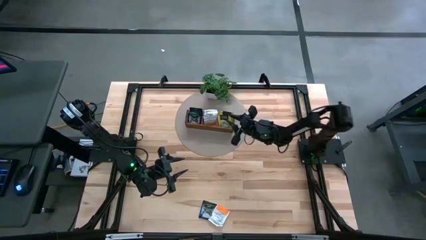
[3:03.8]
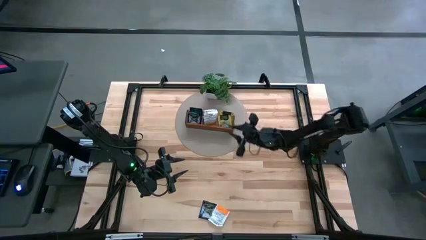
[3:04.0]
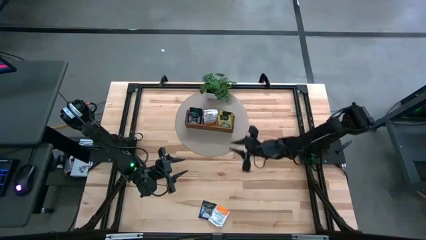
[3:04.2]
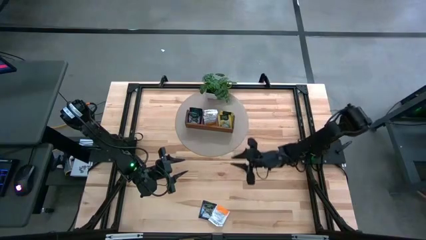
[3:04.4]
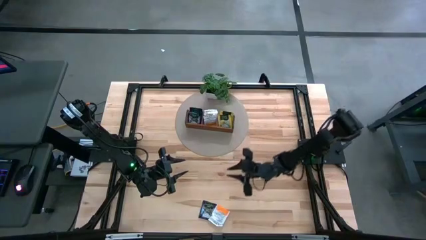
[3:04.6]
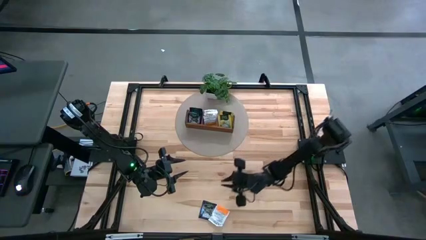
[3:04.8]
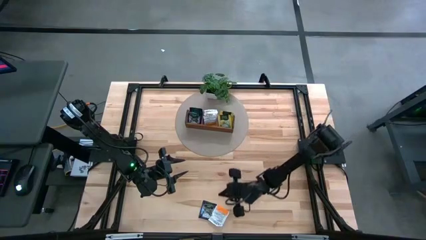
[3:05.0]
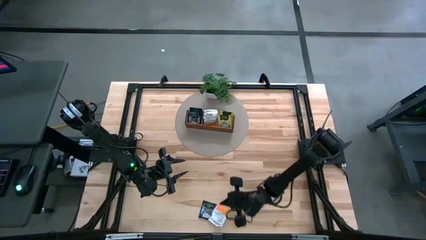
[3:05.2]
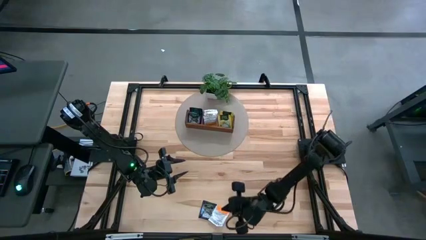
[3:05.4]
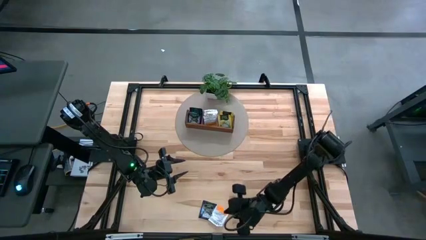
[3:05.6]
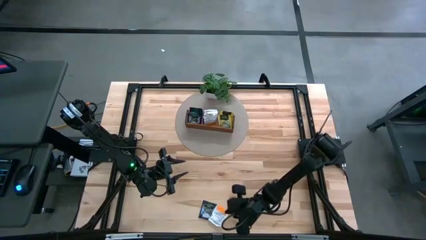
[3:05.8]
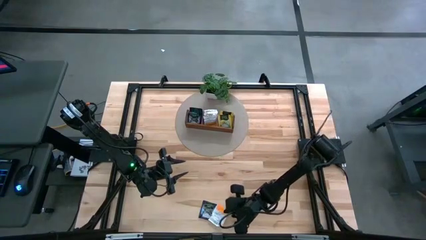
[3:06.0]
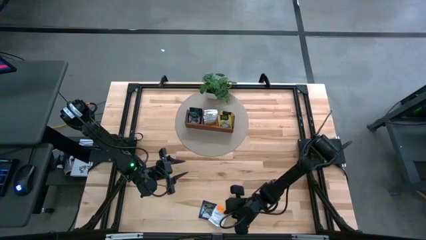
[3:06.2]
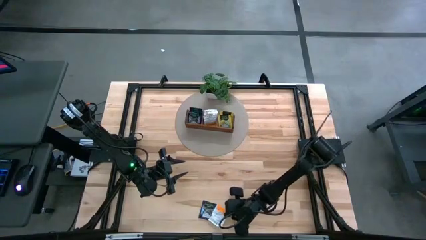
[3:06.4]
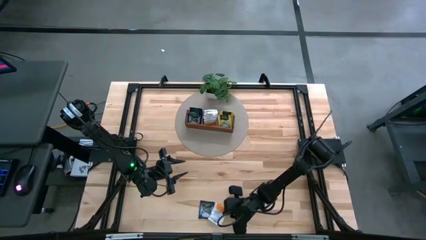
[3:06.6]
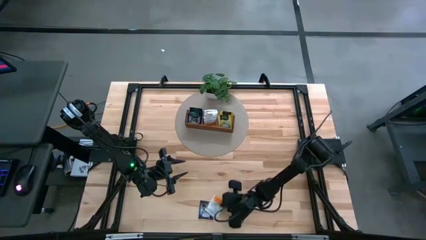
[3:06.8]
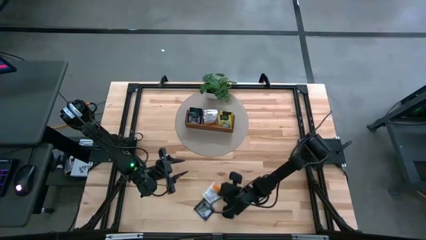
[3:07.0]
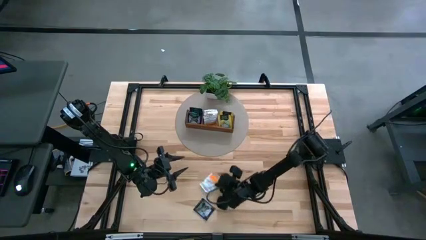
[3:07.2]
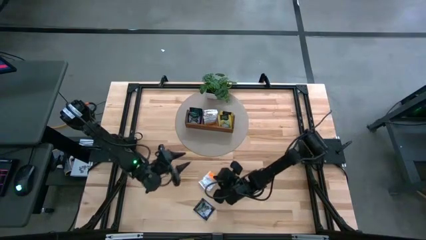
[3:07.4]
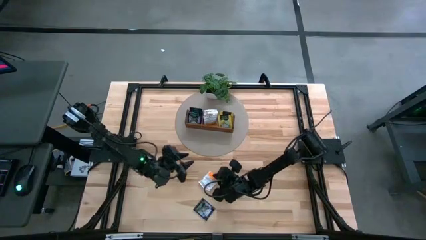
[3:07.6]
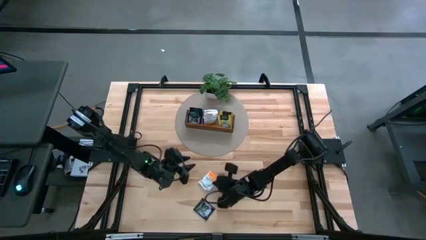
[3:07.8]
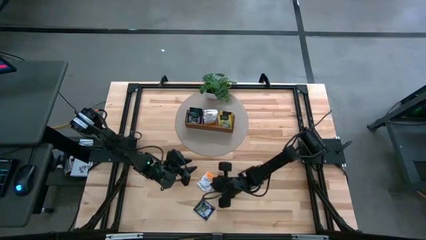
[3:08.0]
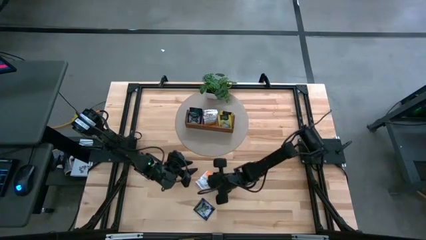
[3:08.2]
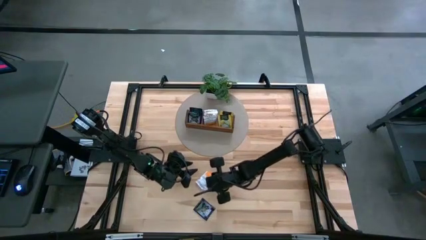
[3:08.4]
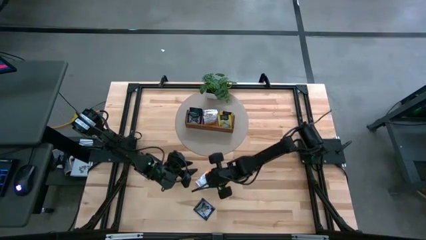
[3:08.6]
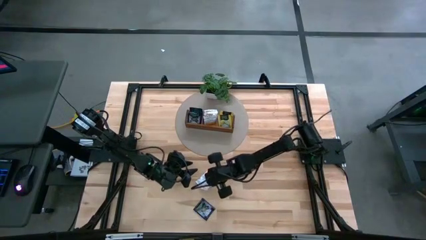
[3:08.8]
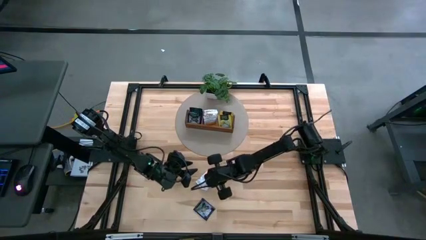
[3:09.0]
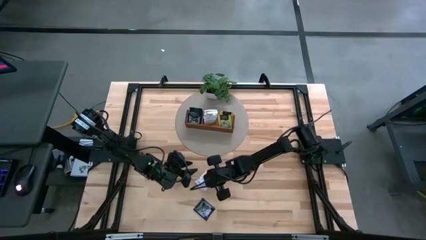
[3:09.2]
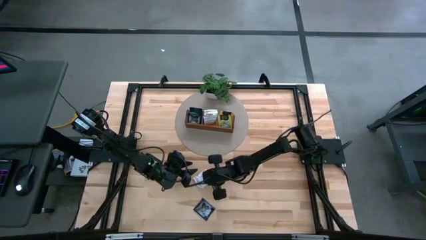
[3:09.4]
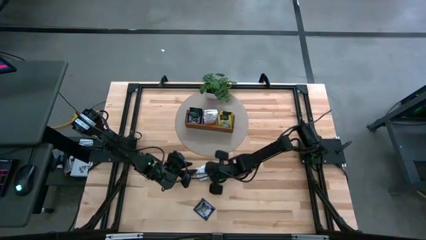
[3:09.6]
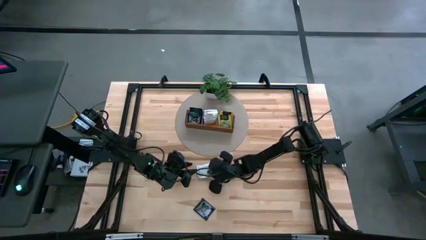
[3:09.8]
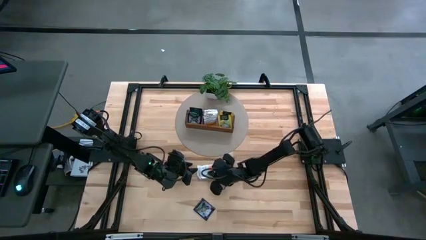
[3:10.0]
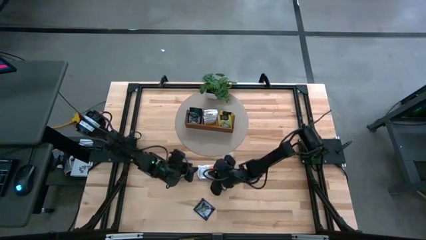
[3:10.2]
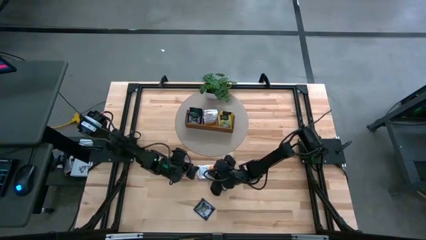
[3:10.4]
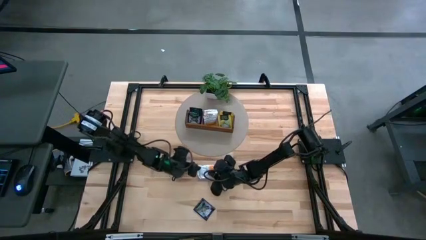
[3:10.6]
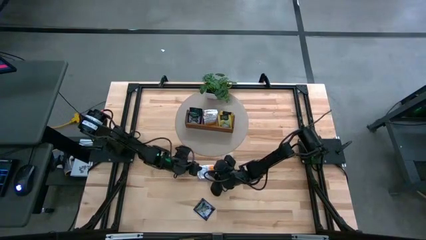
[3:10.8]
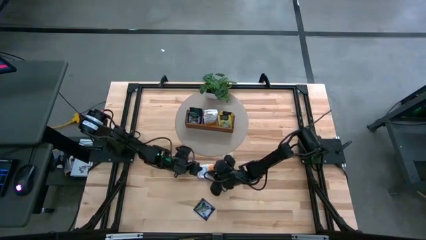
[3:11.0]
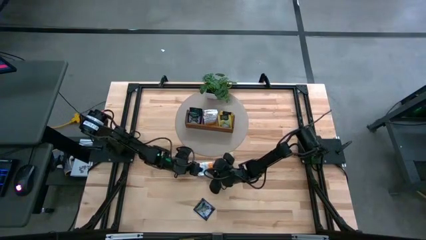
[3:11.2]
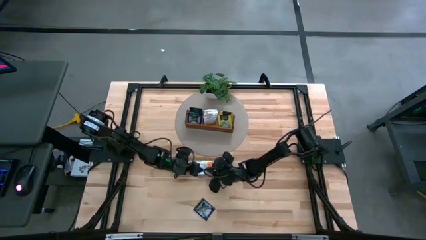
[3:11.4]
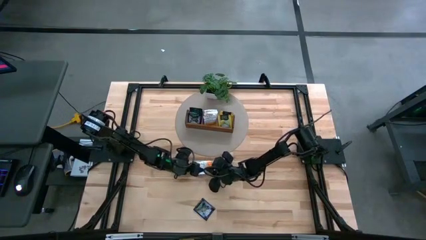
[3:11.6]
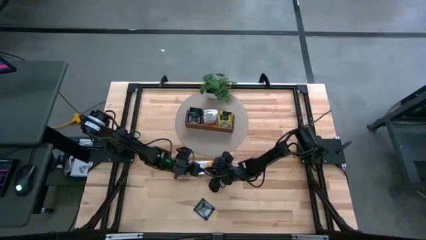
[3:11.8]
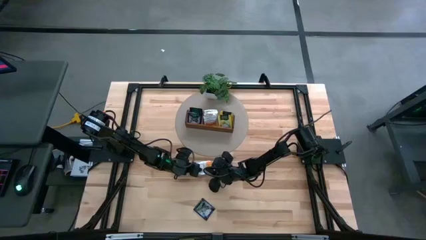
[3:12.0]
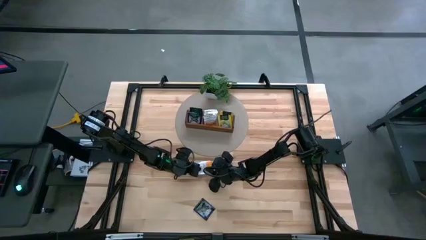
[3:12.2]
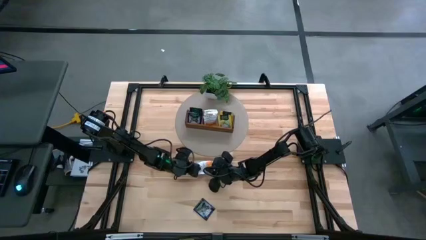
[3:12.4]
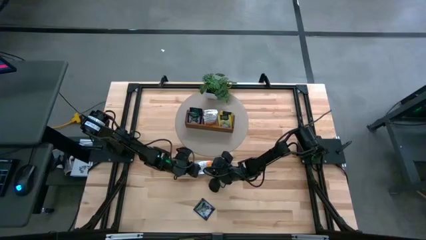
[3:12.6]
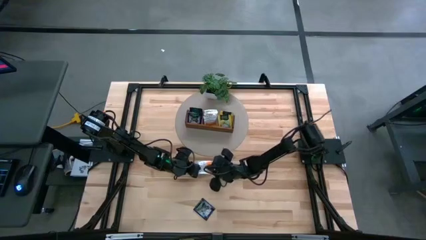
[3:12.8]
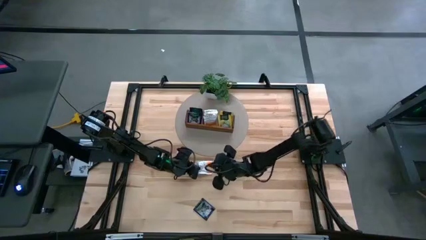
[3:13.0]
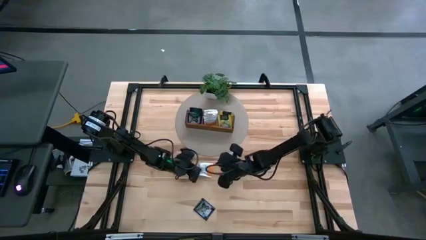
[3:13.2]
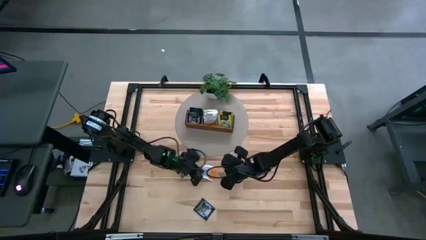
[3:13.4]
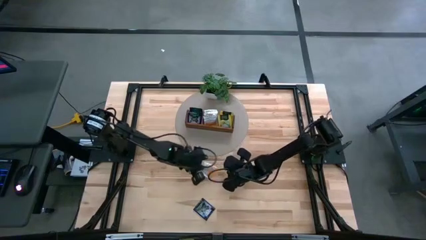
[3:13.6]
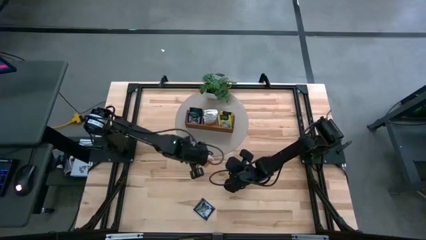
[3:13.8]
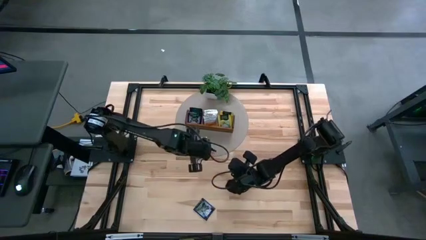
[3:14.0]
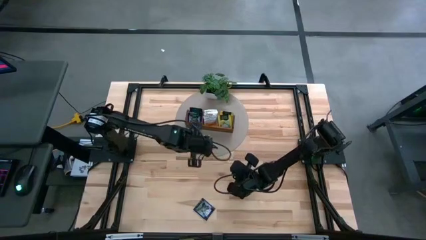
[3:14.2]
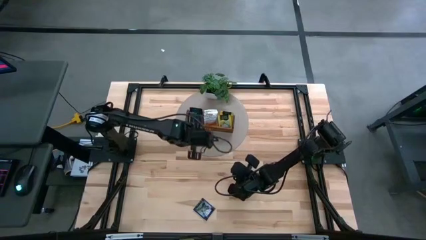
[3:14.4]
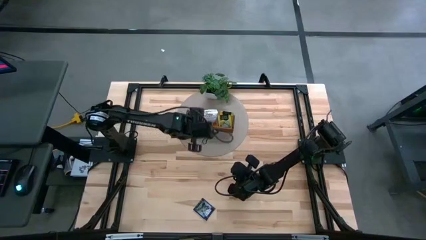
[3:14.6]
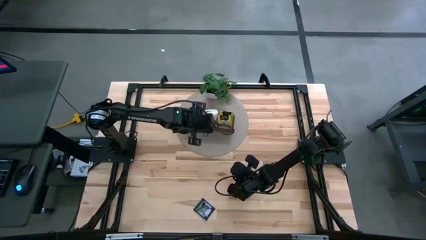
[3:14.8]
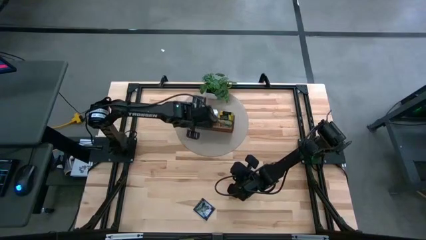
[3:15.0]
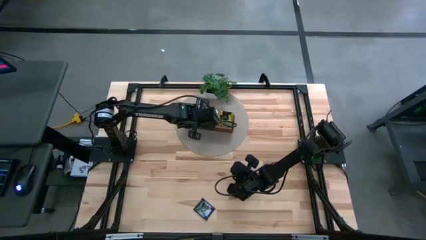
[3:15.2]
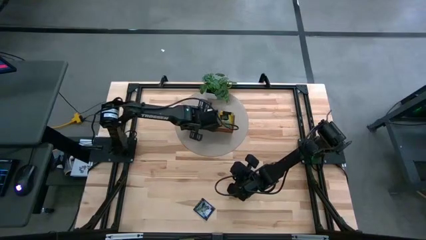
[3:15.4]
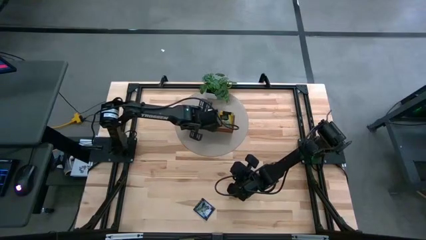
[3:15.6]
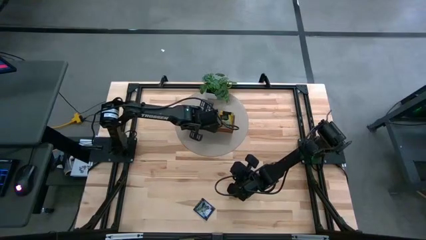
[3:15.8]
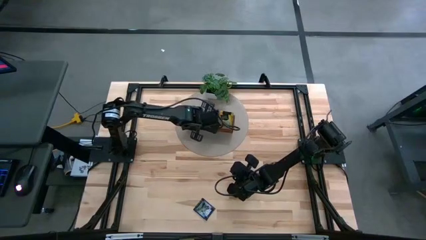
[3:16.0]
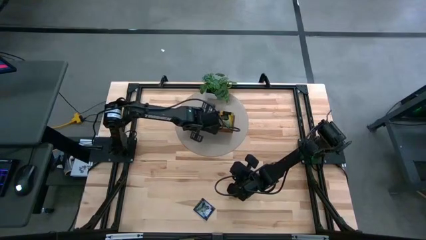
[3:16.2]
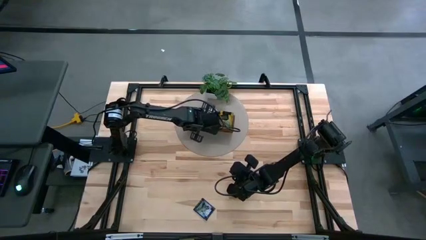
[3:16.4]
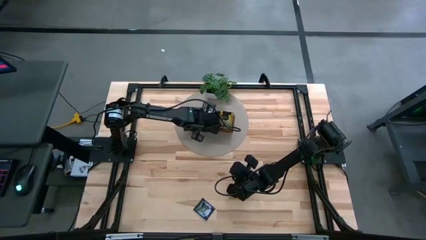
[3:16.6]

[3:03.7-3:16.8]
Task: Pick & Place Tea
Put the white tea bag into the middle section of the wooden organizer

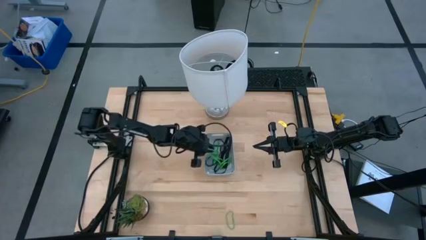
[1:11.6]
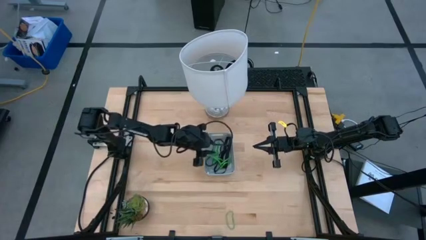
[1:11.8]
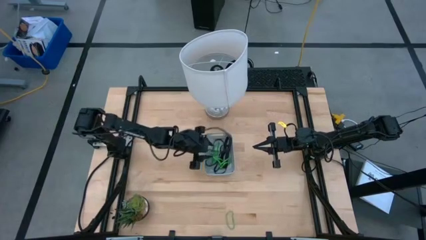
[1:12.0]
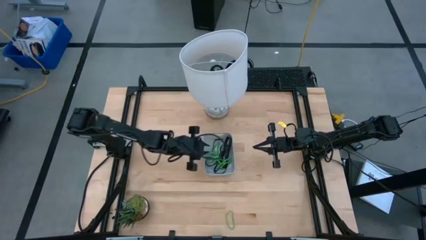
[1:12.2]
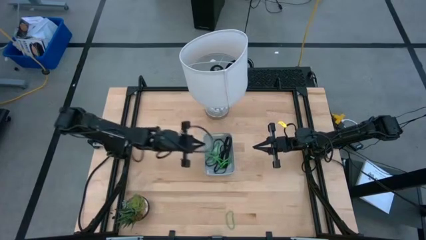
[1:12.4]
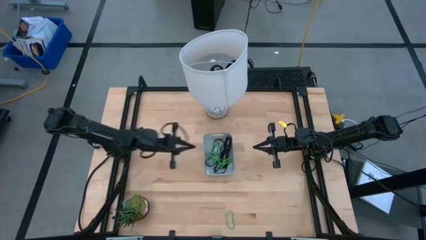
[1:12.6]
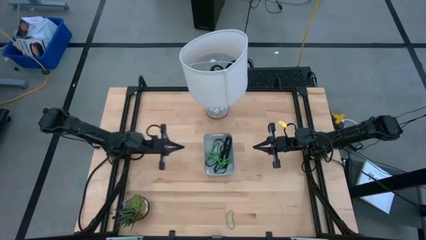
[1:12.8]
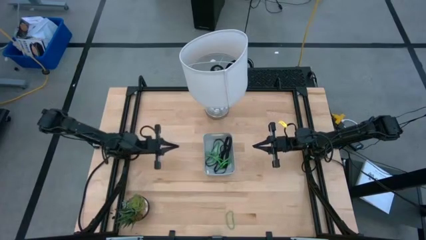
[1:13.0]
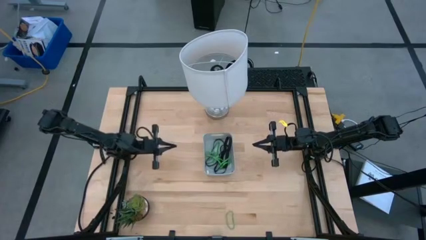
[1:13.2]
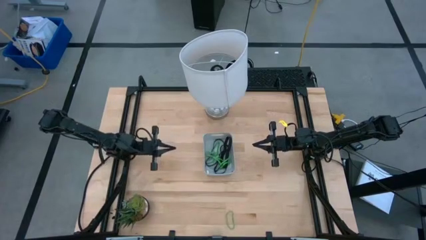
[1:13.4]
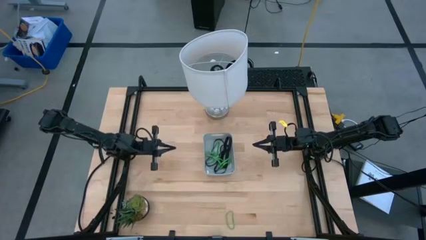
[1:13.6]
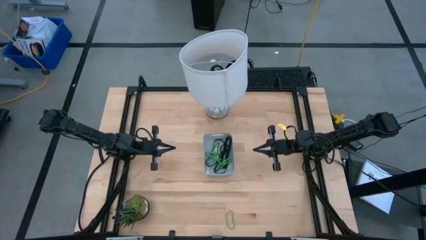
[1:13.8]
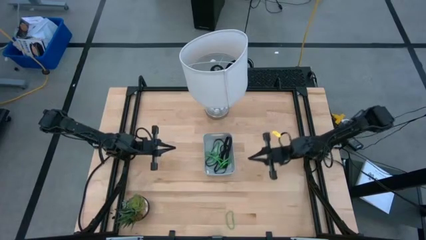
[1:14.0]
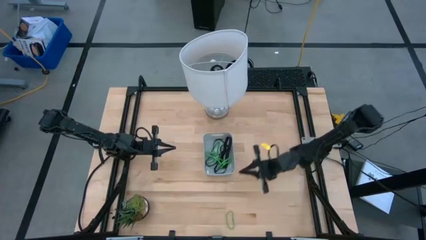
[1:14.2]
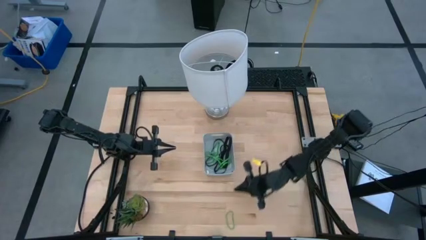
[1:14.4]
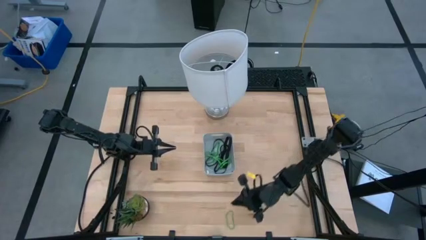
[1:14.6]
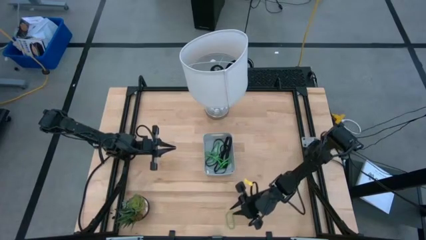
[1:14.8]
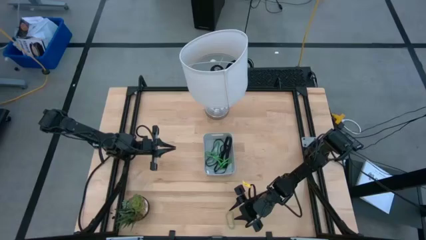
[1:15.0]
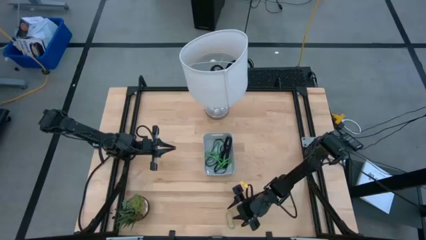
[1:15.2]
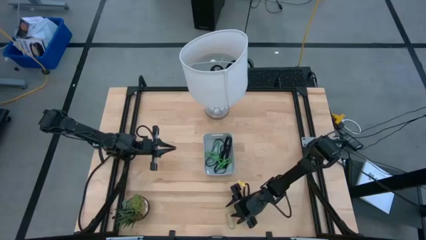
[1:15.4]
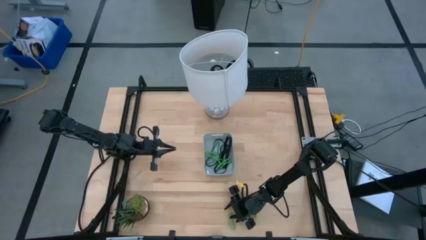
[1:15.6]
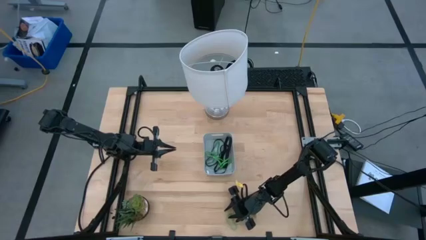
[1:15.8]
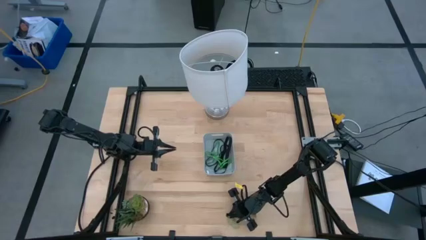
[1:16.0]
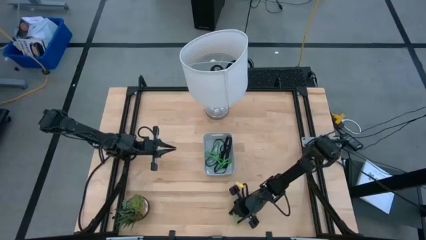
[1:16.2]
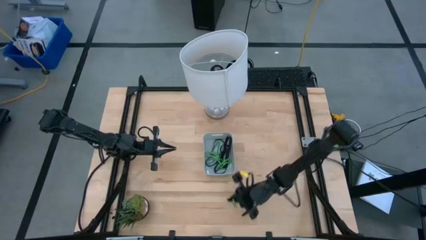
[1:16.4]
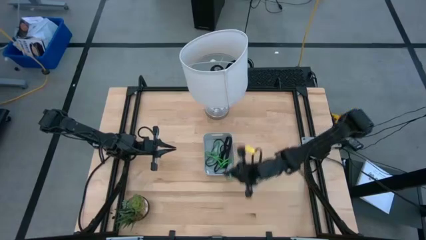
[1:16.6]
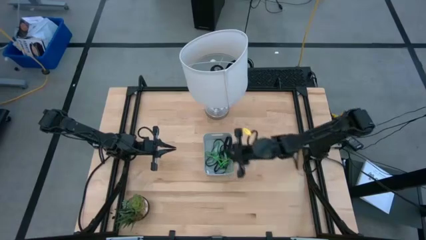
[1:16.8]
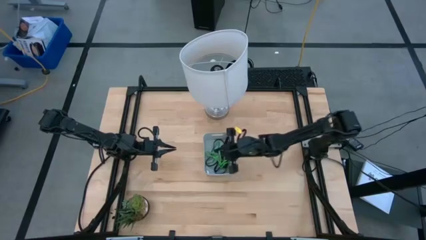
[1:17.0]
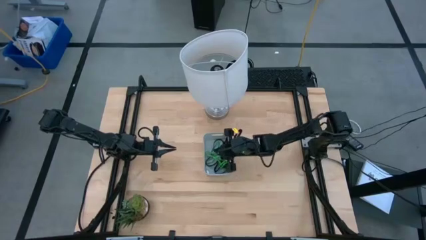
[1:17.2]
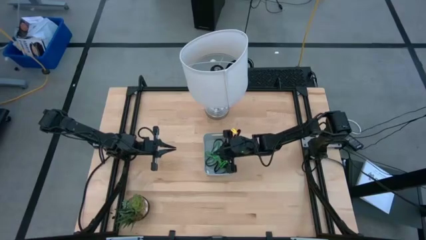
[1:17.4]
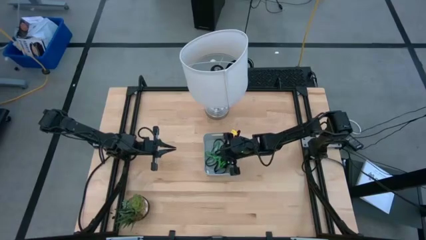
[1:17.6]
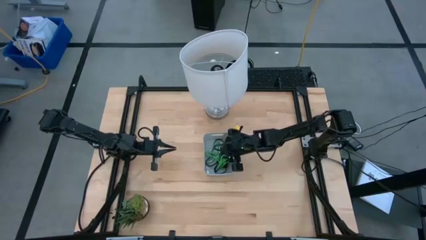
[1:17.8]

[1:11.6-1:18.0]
Task: Pick and place rubber bands into bin
Put the green rubber band into the gray bin
